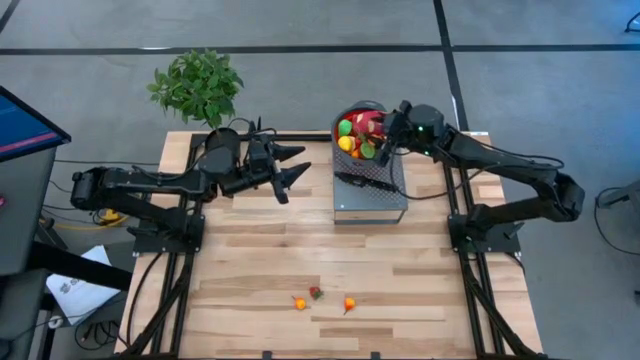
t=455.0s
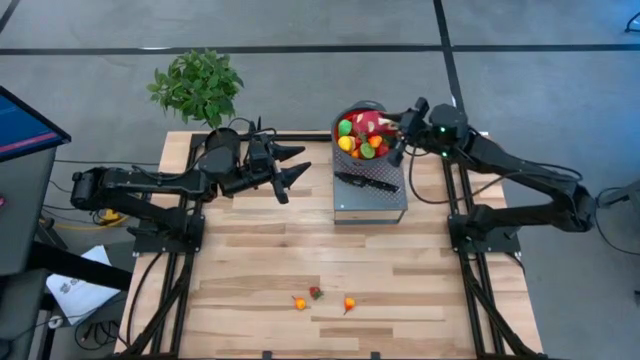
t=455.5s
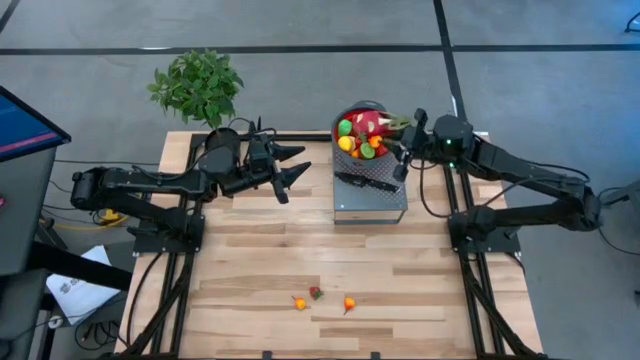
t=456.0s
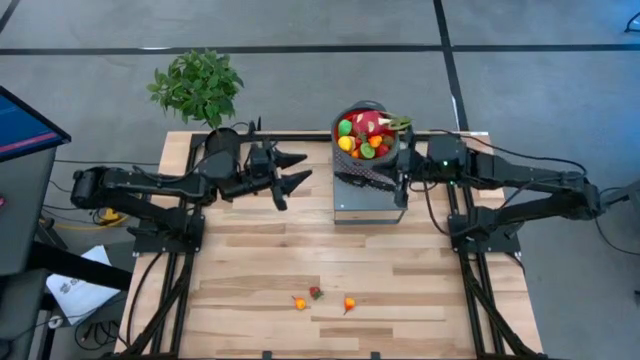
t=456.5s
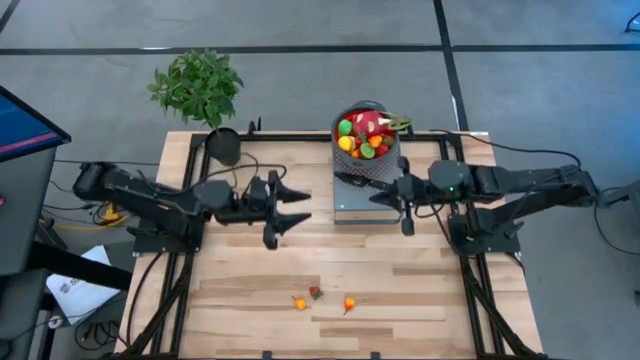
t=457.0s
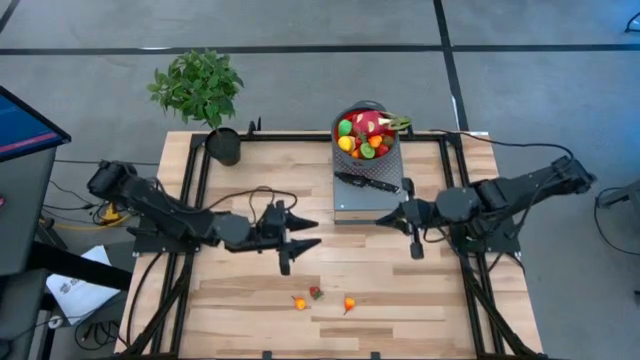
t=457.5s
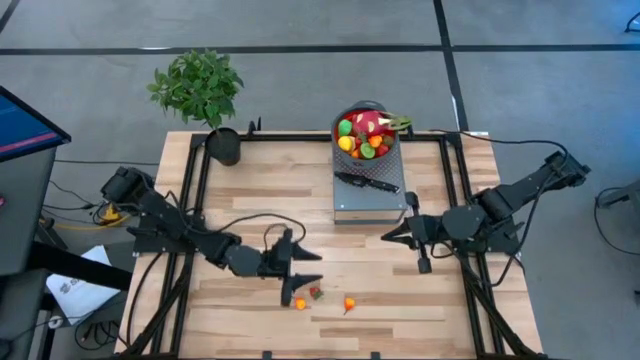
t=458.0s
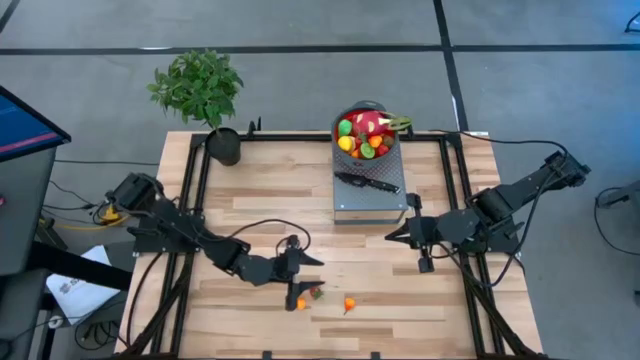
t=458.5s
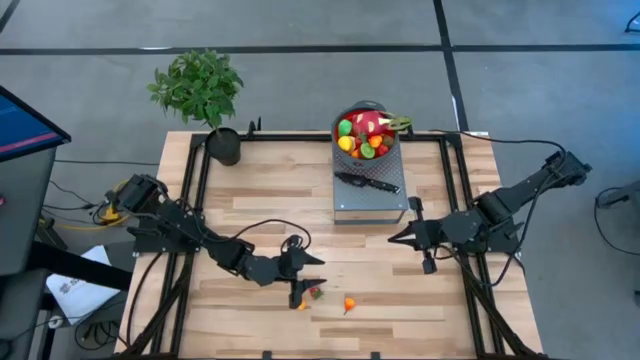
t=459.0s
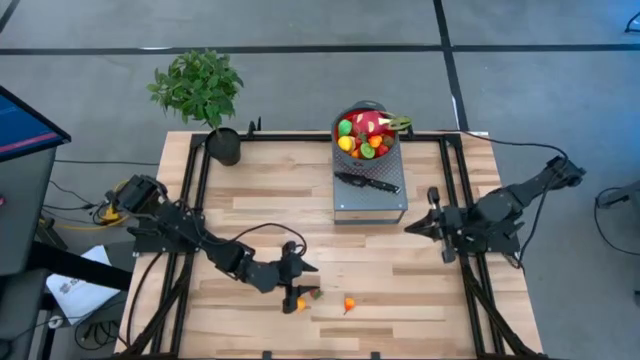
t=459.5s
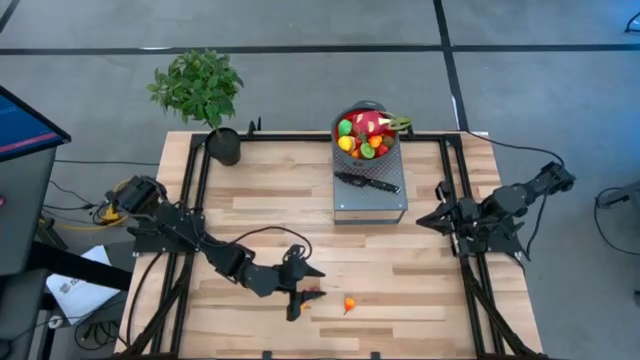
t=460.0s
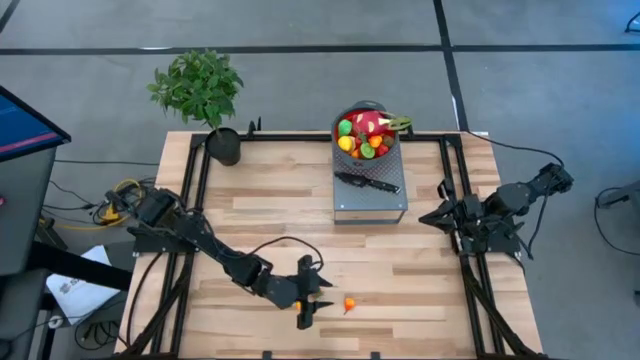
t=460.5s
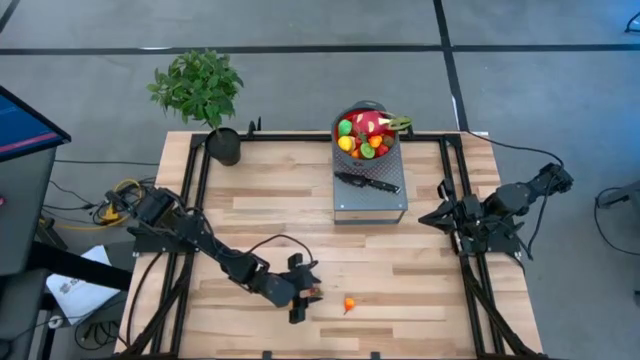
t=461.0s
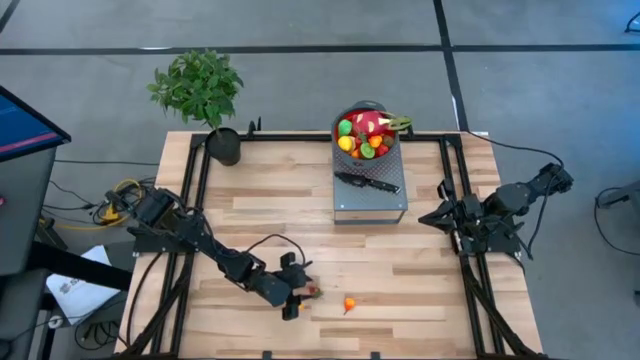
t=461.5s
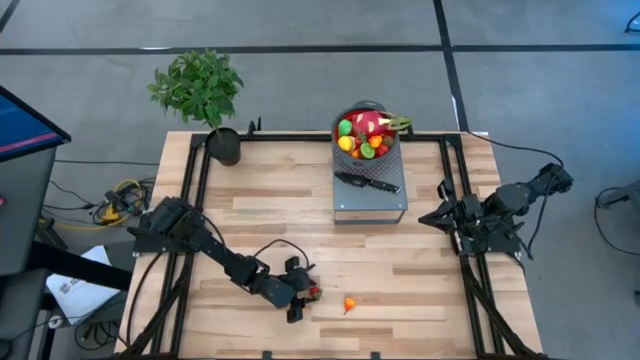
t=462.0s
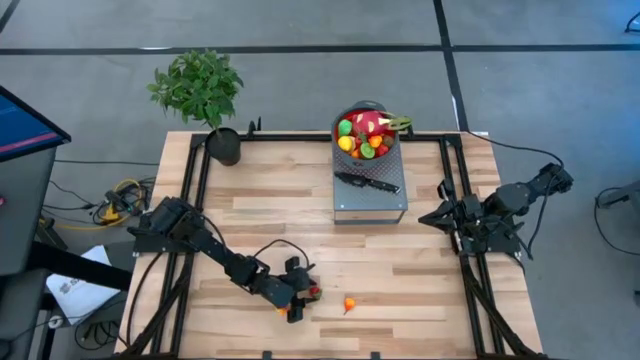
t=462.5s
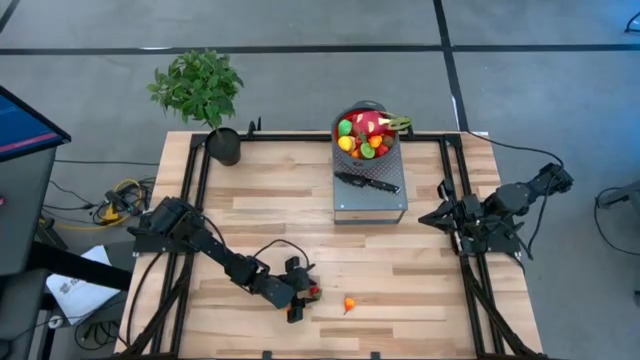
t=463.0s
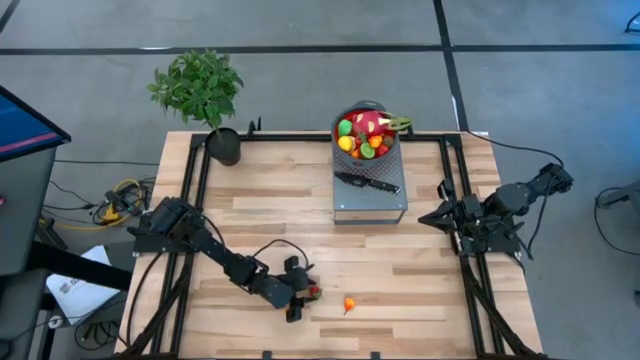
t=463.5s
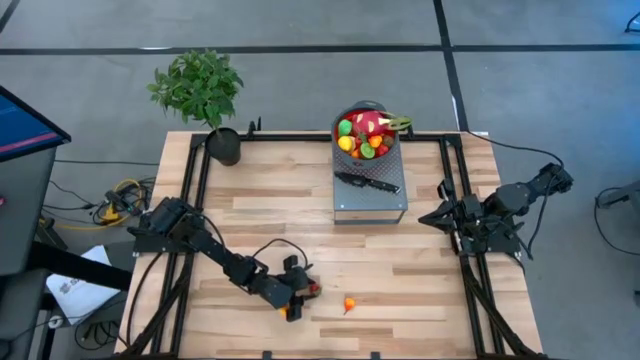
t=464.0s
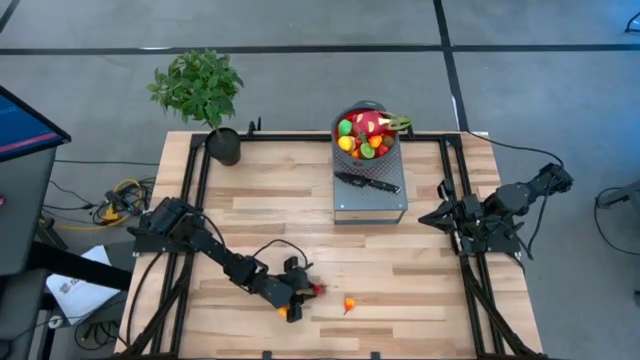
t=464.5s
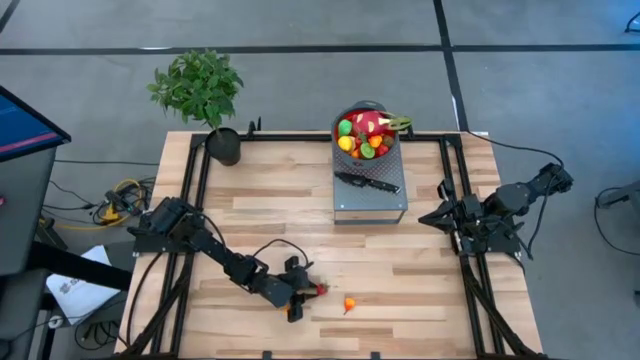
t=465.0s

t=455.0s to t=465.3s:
Task: Pick & Place Fruit
Put the strawberry into the red colander on the shelf

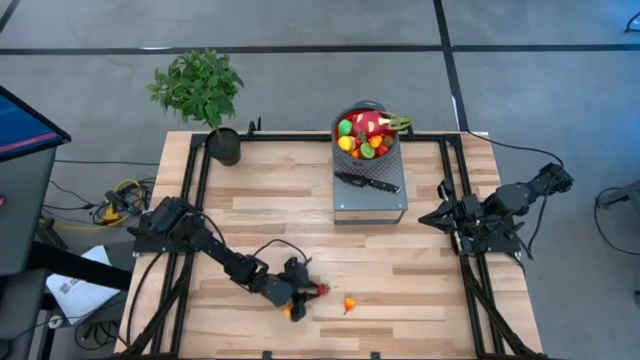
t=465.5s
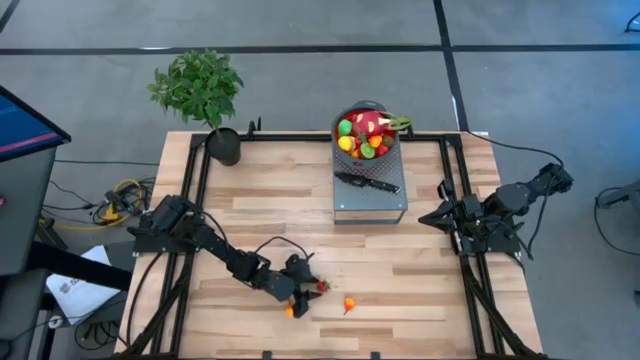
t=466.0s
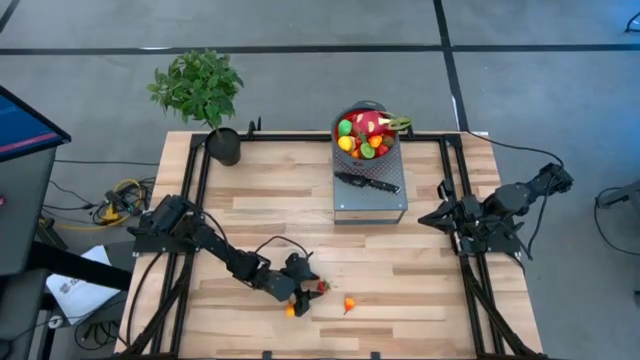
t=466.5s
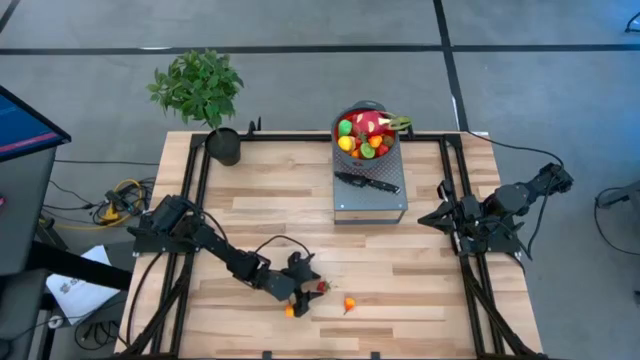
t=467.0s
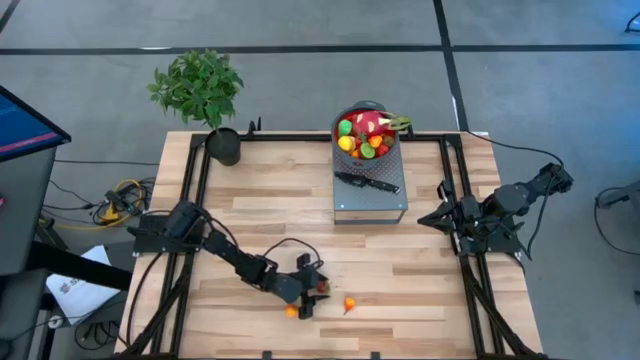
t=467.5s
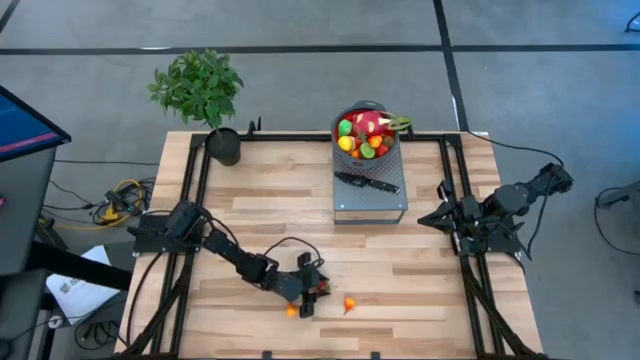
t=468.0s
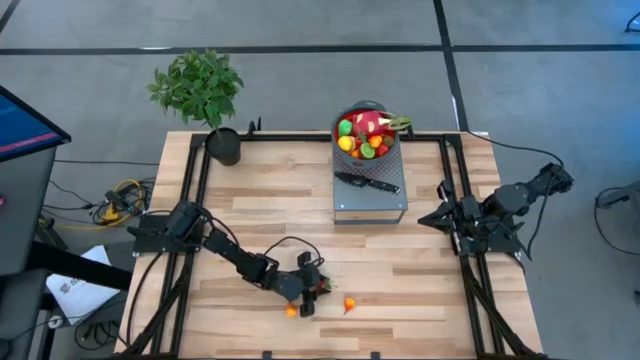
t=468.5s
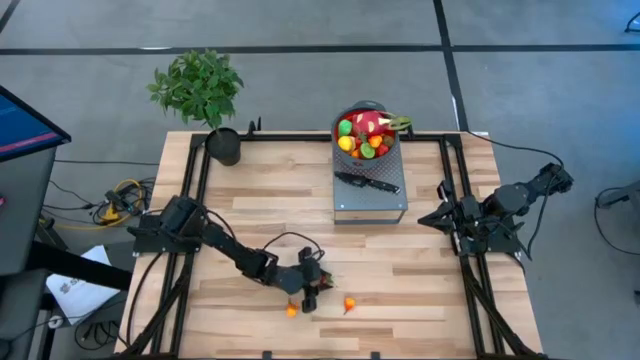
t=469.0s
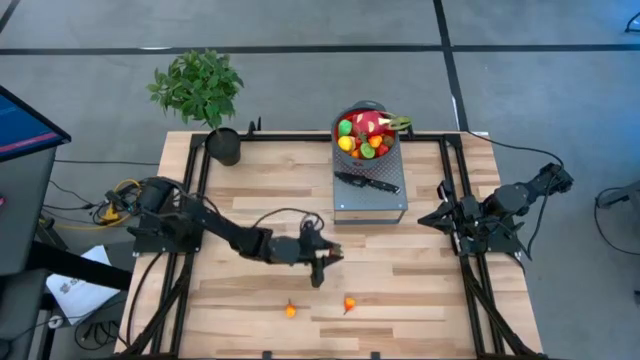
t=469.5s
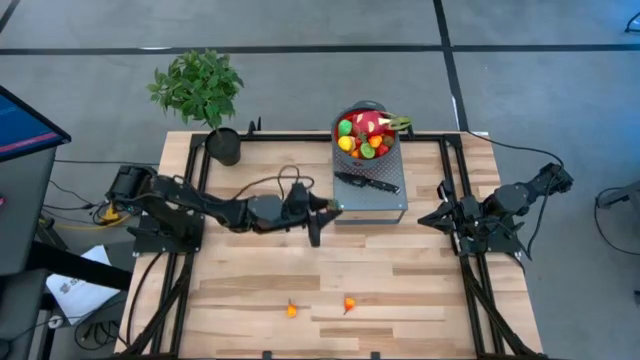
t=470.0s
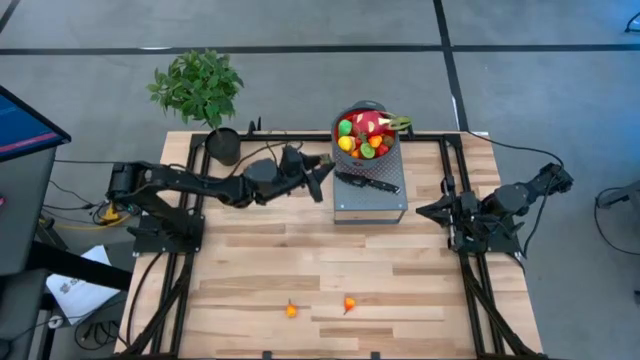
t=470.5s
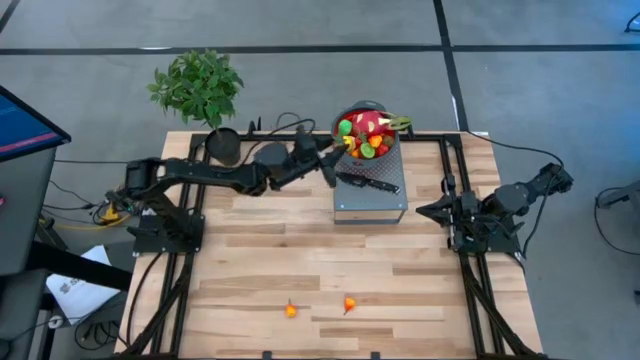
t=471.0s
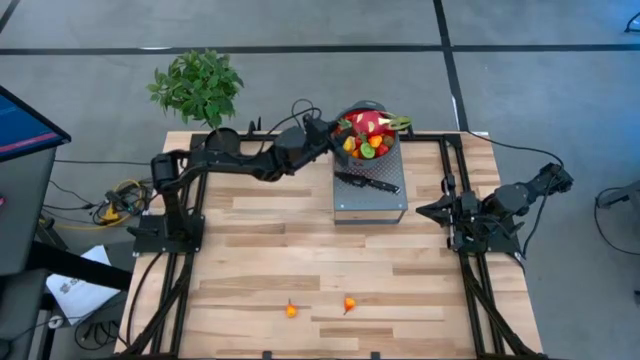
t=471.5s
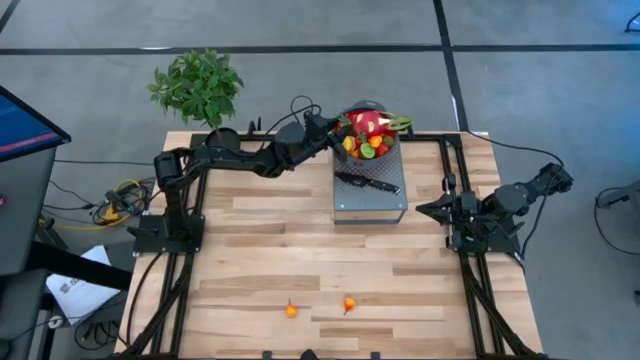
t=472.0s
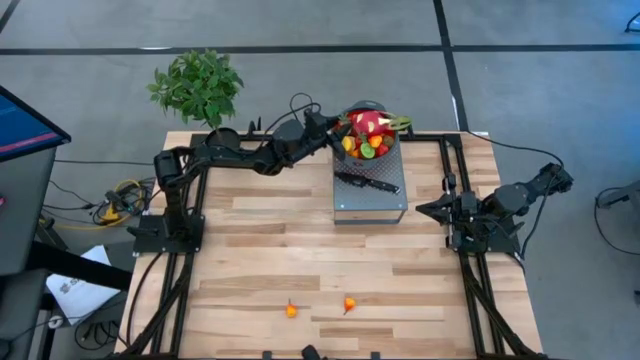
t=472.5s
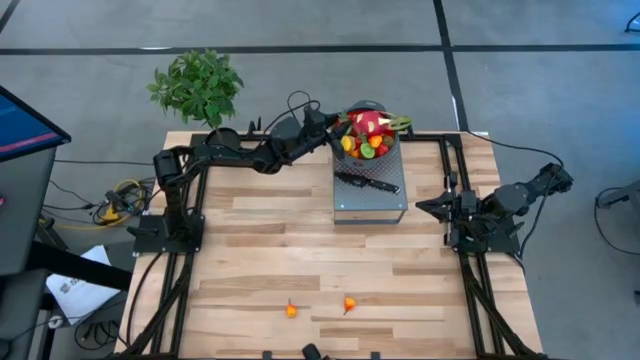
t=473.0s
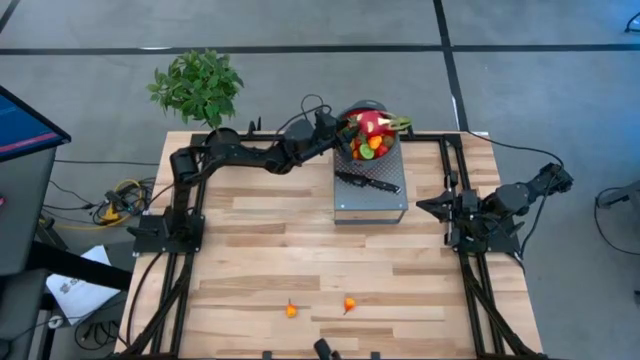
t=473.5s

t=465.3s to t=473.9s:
Put the strawberry into the red colander on the shelf

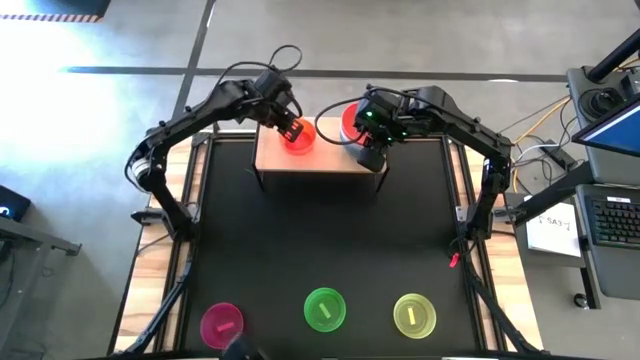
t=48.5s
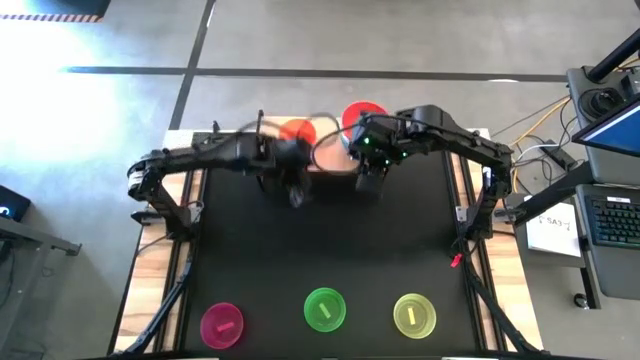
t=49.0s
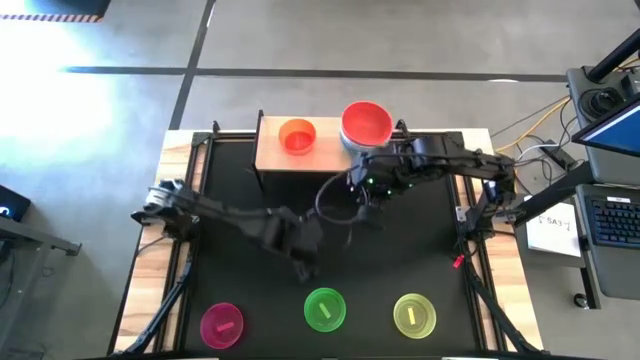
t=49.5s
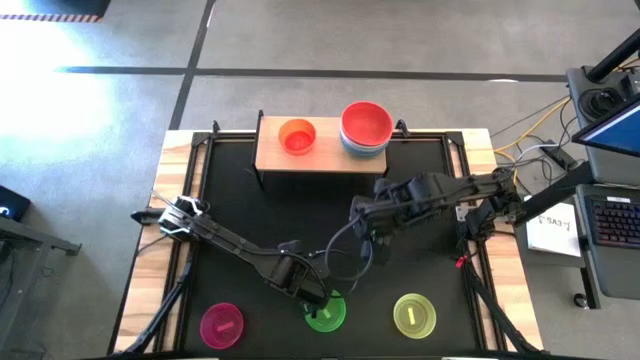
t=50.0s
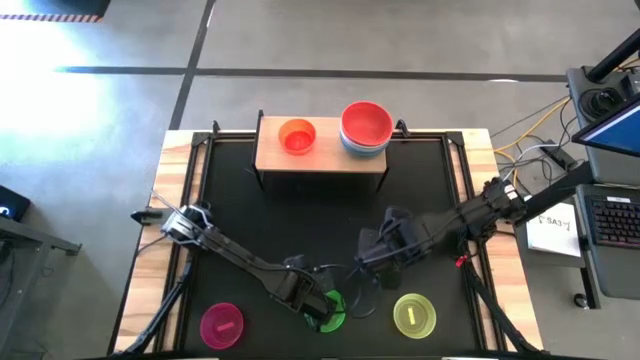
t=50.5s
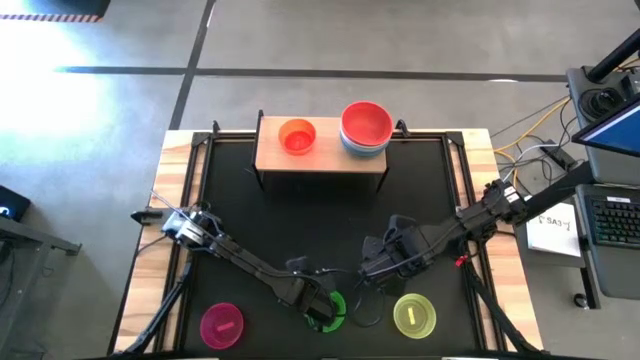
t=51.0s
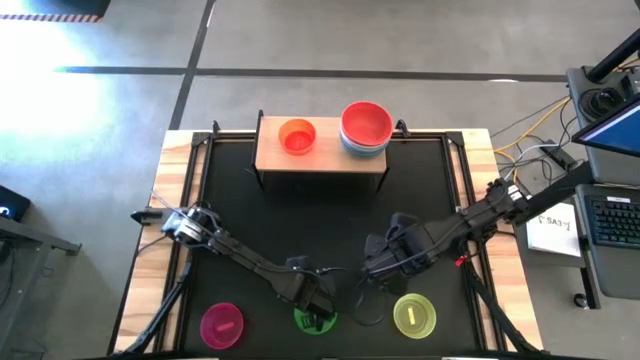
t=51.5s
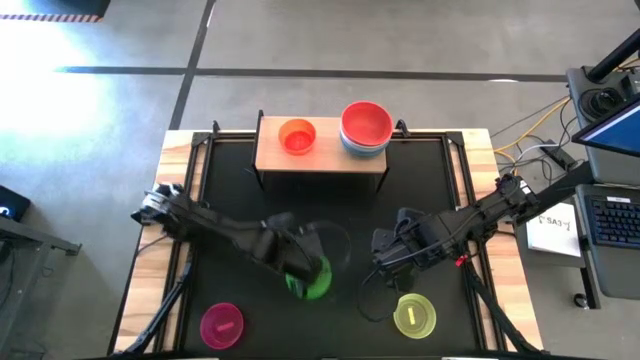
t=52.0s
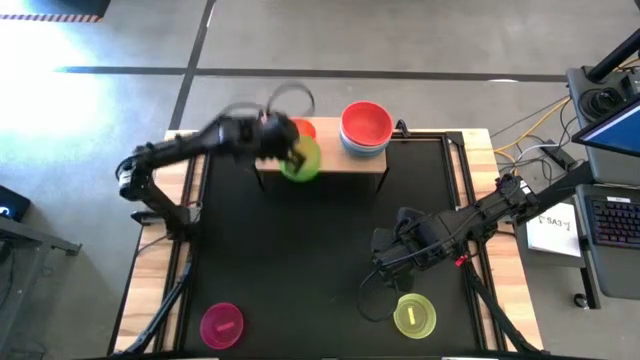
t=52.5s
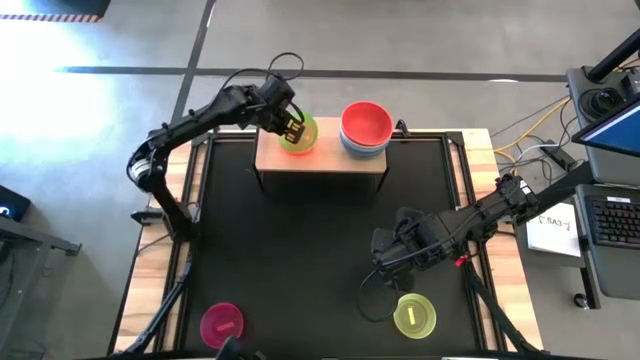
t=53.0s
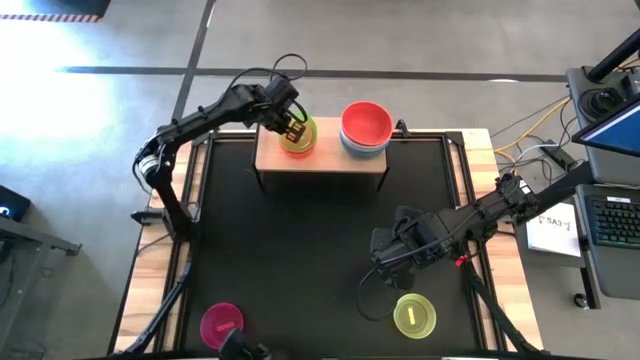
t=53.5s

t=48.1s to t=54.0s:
Task: Place and stack bowls onto a shelf
Stack the green bowl on top of the light orange bowl on the shelf
